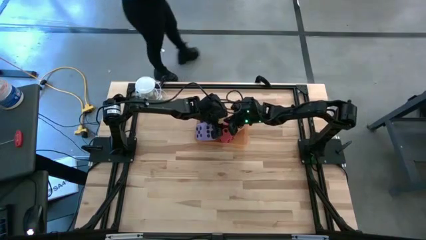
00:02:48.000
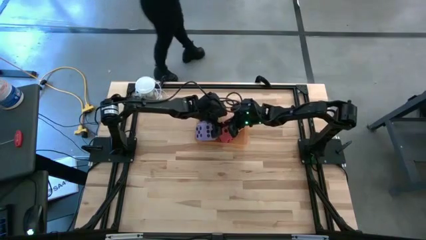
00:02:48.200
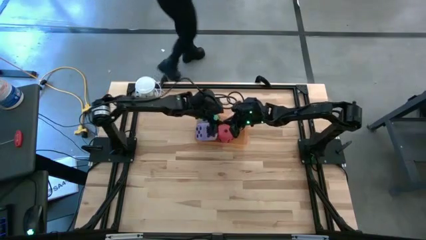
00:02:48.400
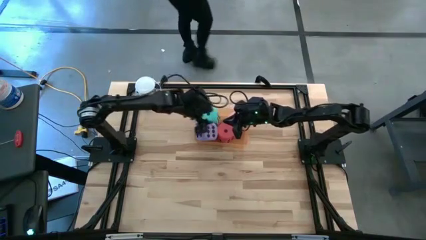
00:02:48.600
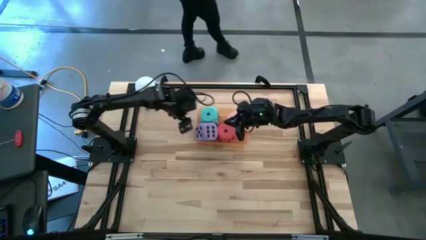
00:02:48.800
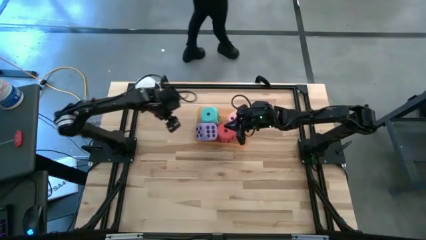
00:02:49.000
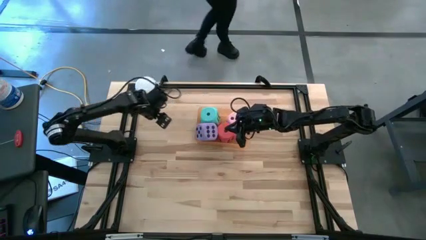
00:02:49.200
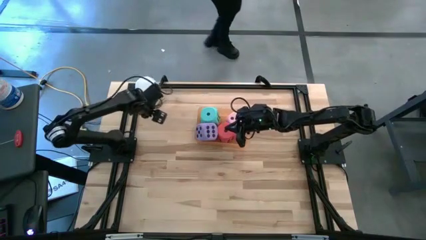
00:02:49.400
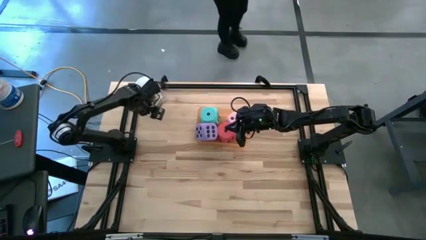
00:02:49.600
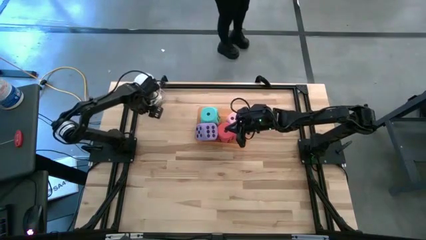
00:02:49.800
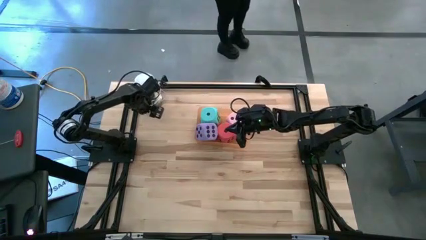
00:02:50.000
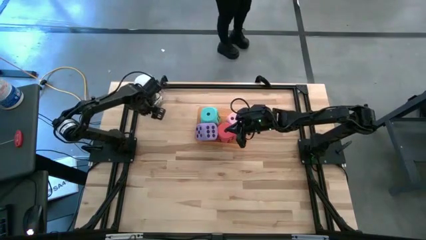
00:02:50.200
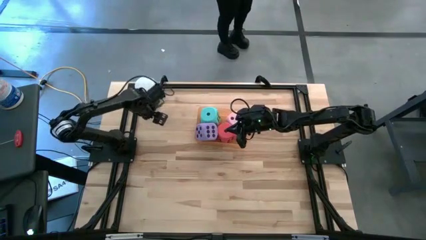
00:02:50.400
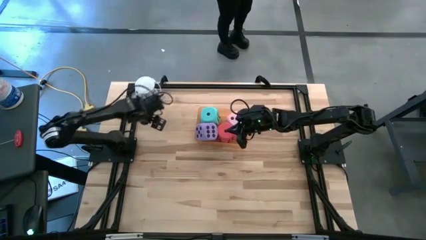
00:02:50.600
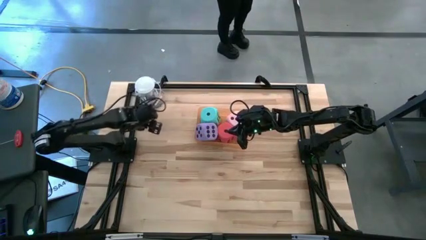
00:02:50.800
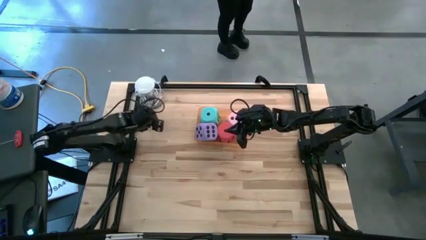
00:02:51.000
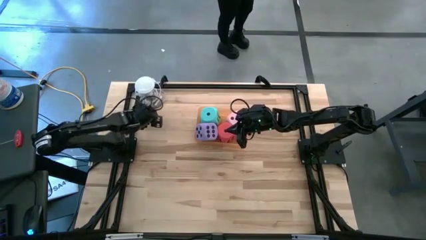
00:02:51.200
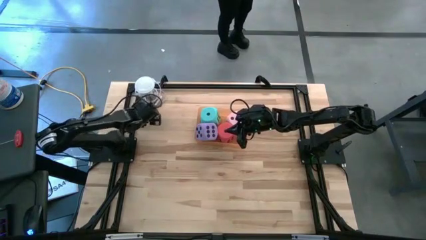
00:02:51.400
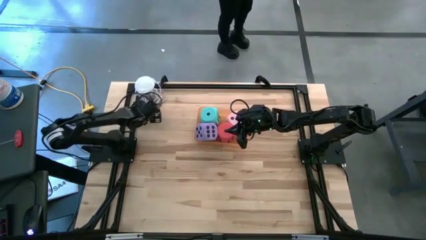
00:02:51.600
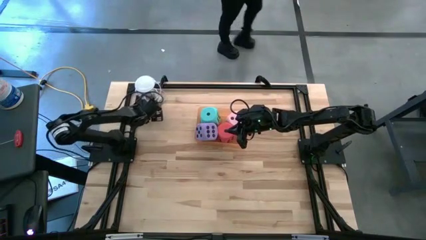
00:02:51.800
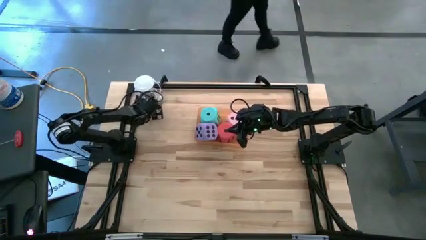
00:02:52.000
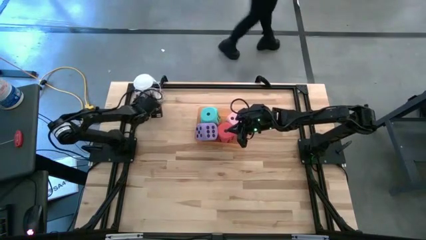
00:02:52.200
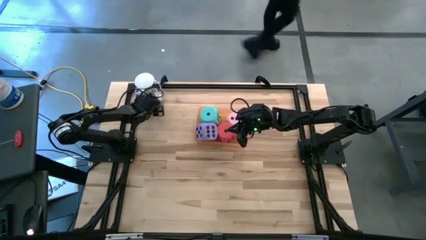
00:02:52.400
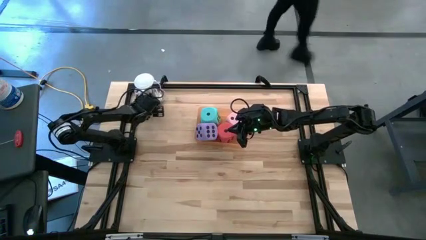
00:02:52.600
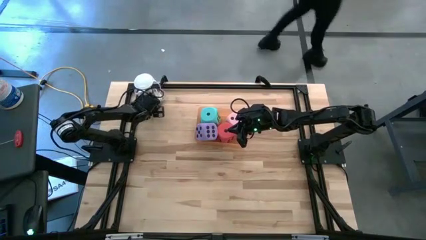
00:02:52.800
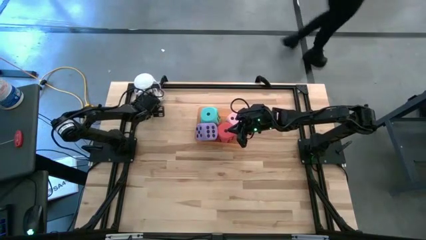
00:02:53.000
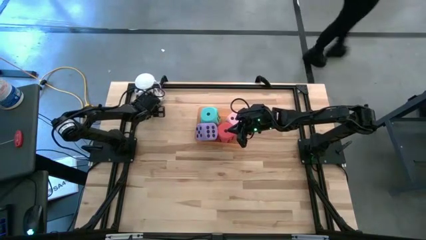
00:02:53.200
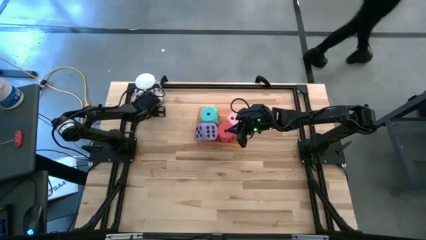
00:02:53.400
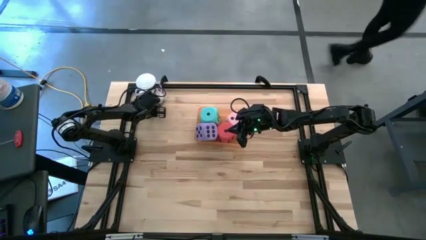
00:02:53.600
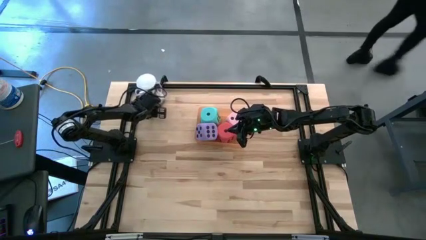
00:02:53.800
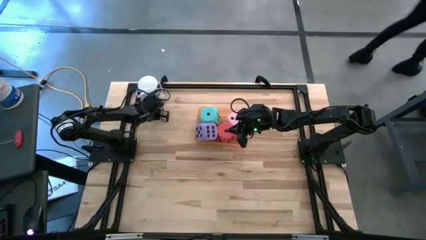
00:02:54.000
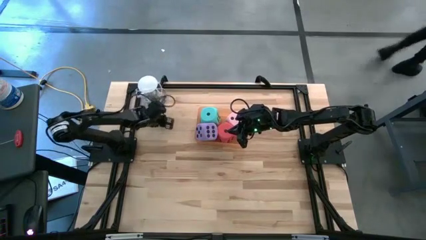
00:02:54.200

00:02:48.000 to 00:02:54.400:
Task: Pick & Place Dice
Put the small blue dice into the orange bin

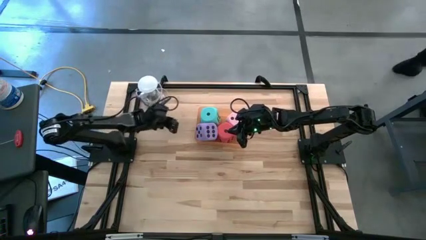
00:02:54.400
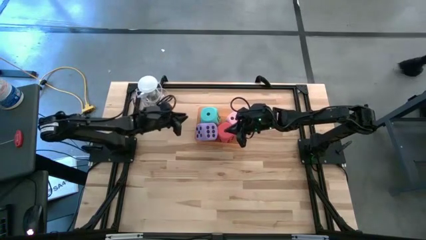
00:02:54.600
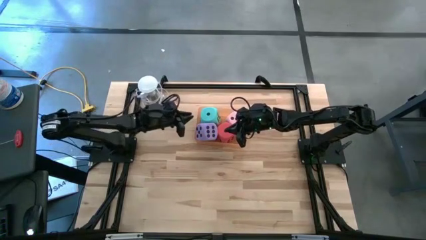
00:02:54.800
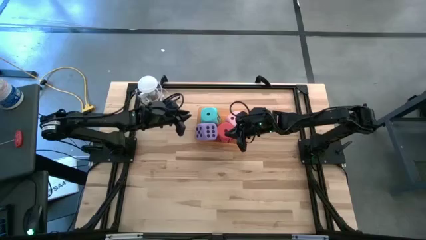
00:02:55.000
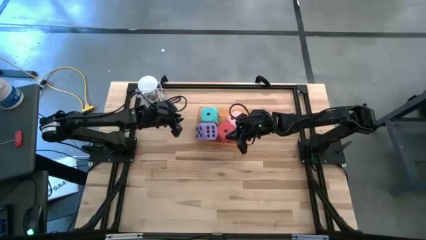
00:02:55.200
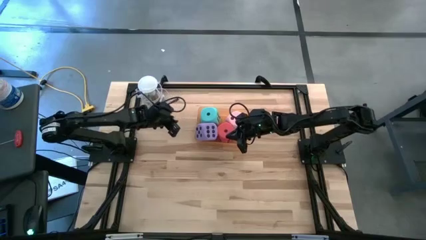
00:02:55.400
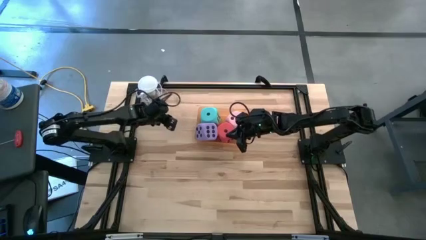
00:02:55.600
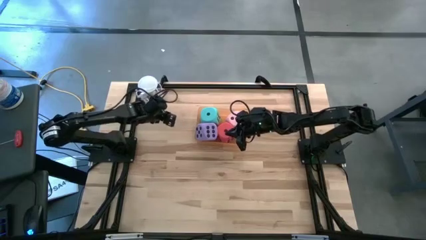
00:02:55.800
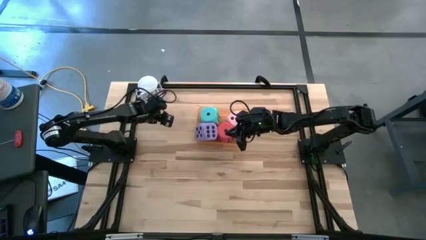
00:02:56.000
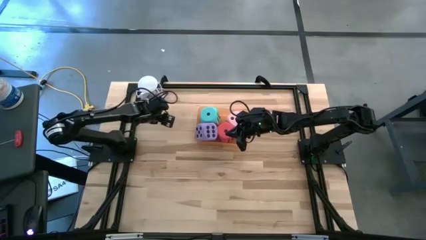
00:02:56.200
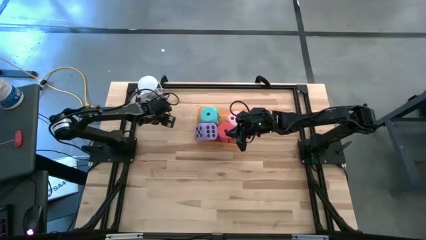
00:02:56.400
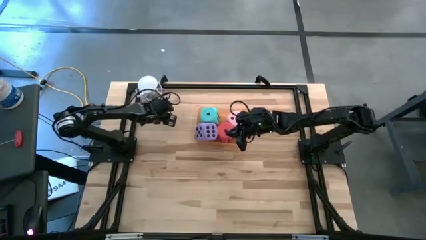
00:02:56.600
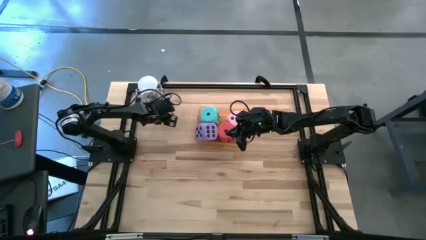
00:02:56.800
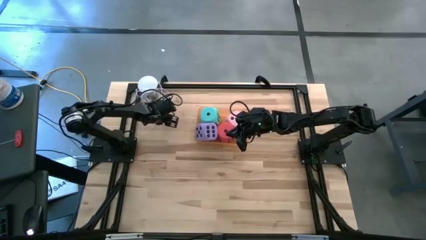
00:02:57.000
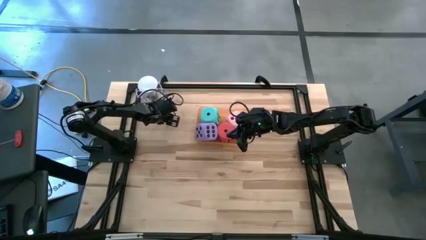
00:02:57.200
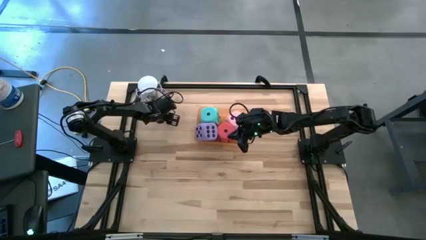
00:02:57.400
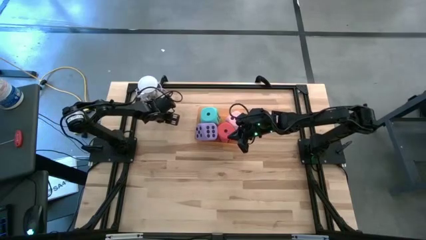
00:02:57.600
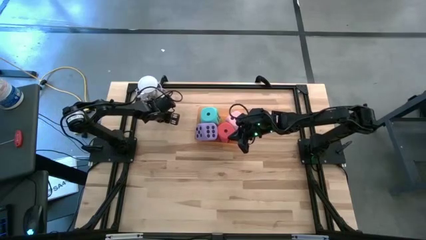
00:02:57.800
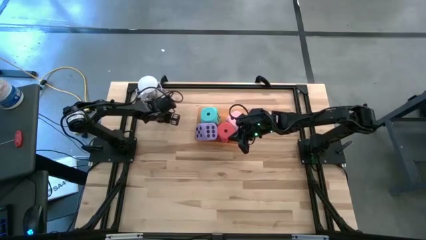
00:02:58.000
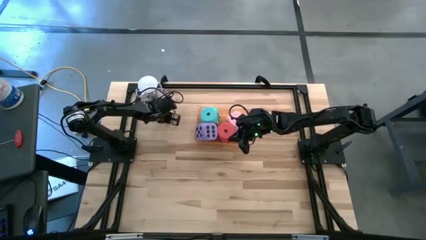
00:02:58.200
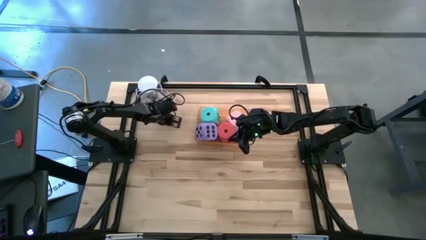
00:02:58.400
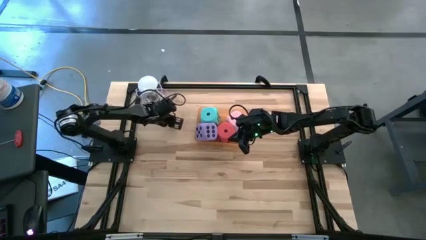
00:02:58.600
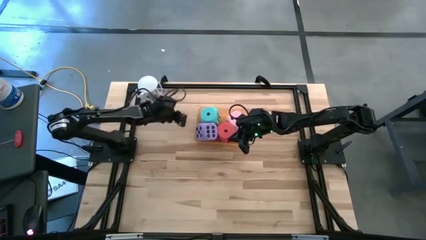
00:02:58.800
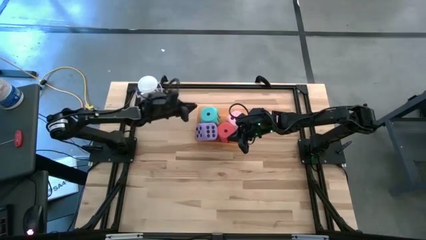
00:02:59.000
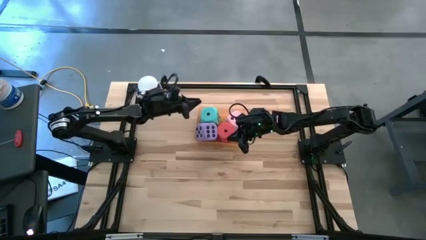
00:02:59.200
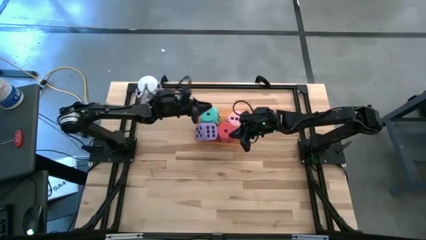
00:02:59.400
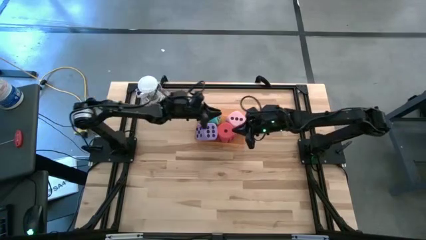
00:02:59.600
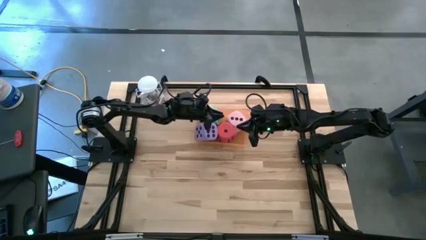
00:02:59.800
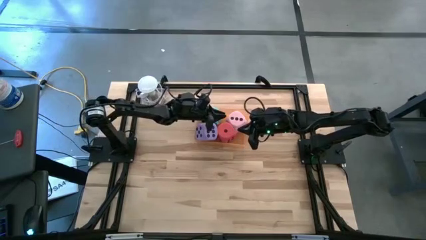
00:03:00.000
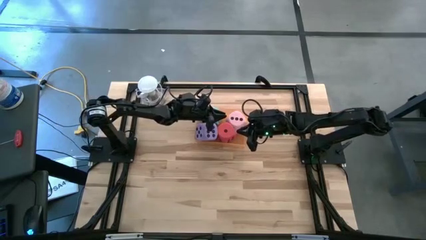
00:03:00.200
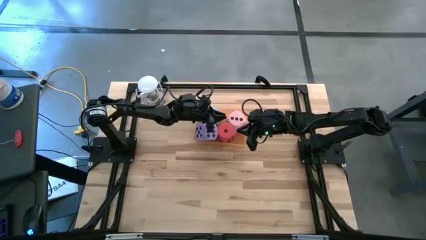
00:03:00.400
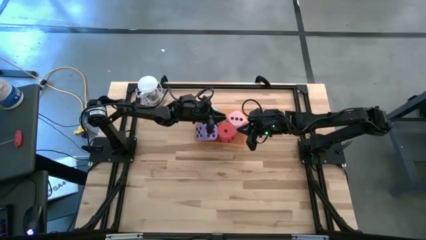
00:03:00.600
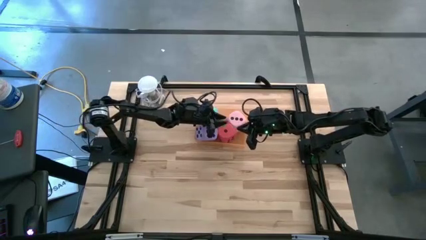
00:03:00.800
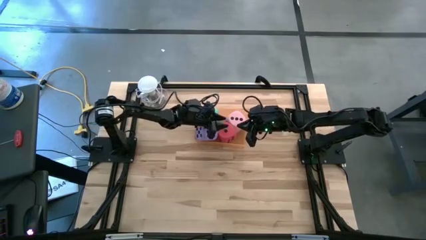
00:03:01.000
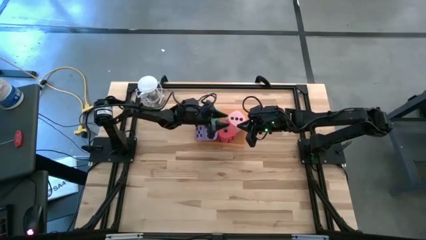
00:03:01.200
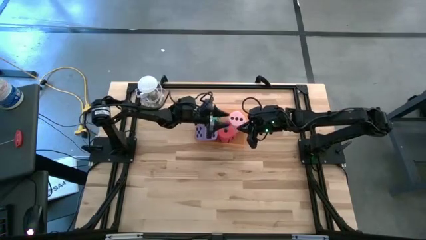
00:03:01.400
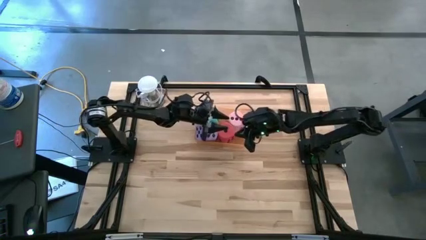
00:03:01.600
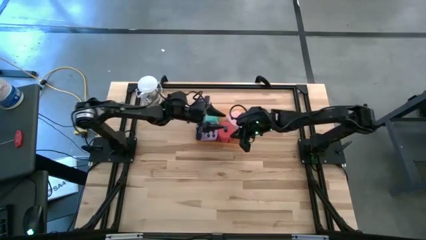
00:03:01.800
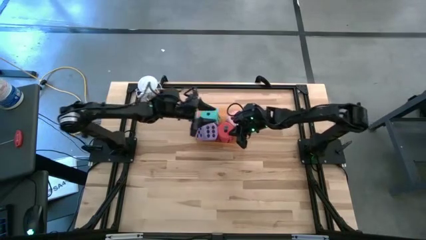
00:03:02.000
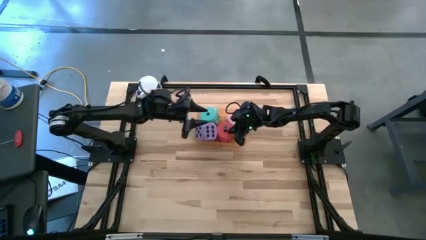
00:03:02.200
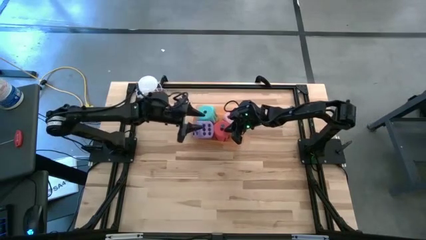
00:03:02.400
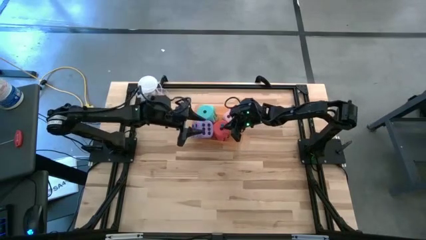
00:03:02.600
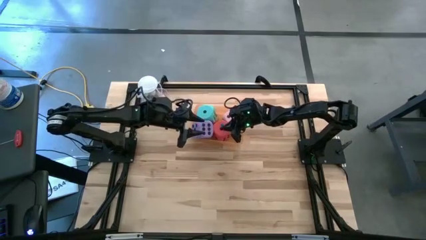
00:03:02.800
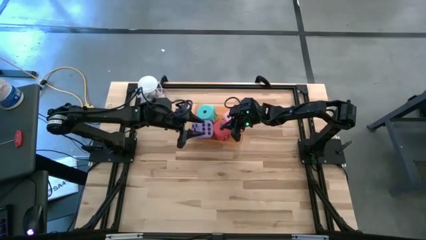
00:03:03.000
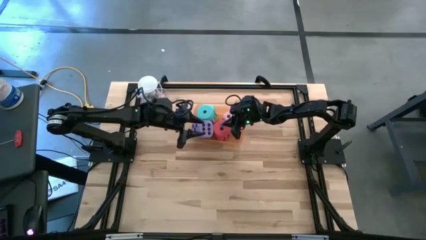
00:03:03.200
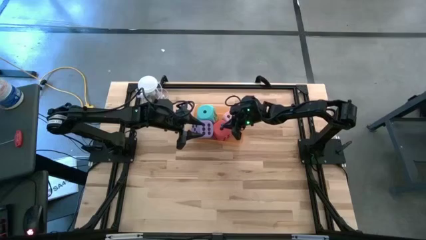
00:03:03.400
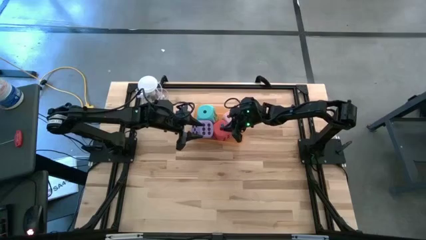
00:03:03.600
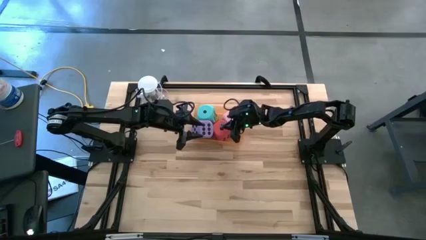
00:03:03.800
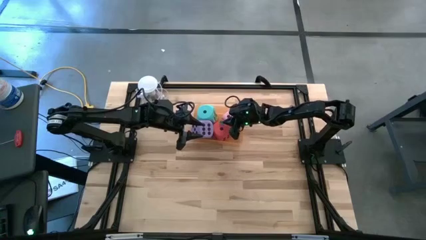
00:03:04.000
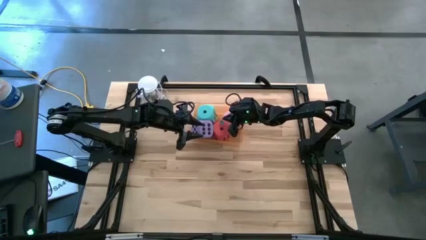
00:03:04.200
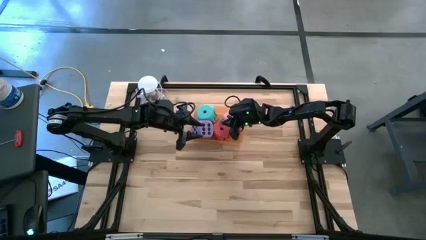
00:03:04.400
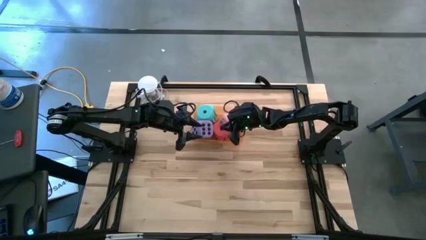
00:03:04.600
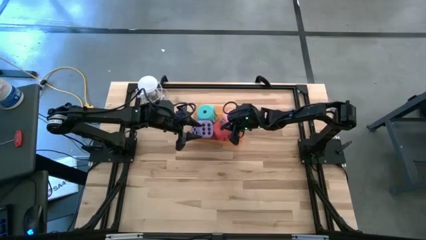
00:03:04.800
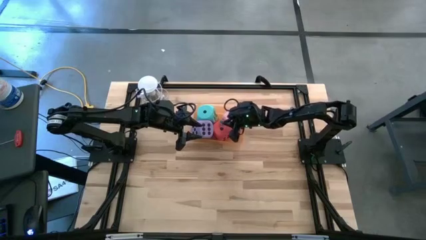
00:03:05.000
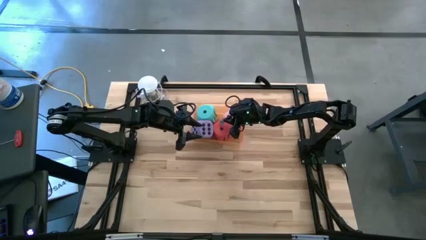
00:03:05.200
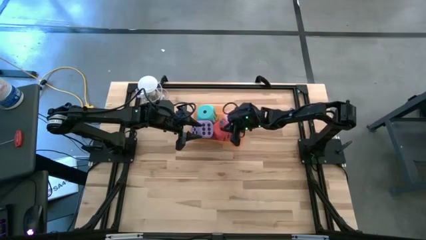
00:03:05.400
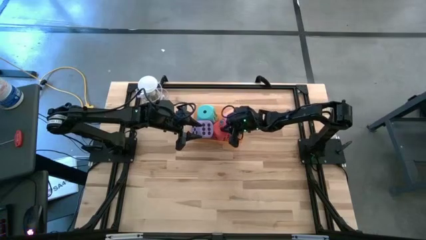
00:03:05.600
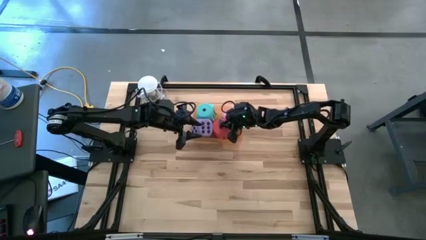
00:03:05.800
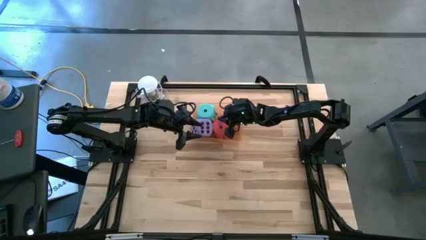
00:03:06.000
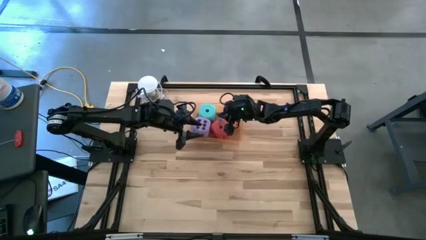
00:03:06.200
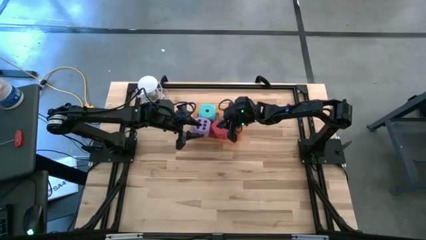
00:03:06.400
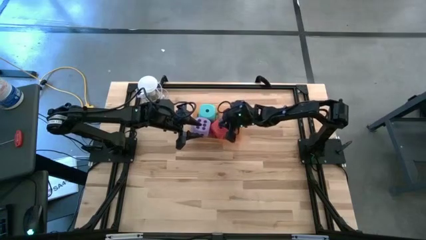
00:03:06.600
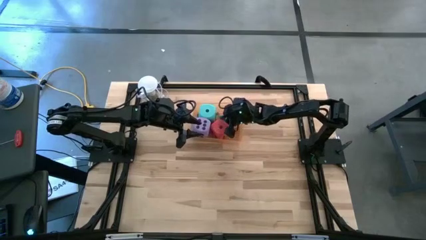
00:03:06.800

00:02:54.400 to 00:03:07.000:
Put the small blue dice into the orange bin
